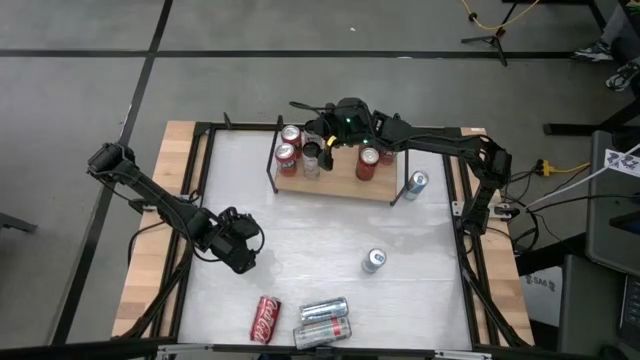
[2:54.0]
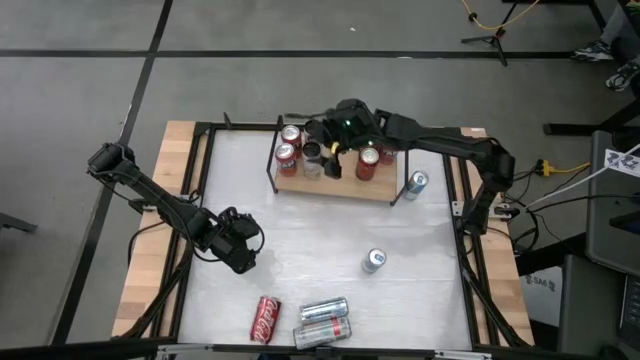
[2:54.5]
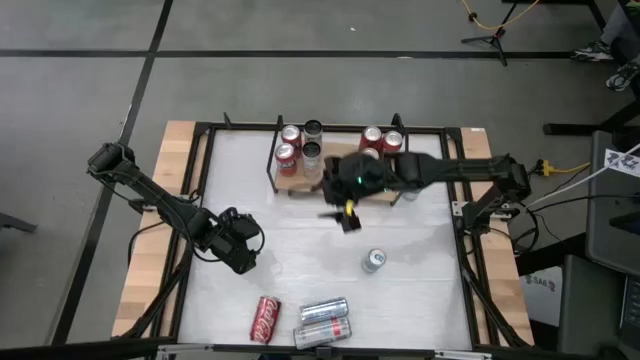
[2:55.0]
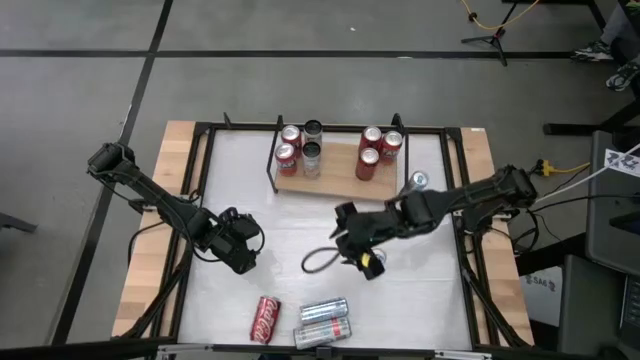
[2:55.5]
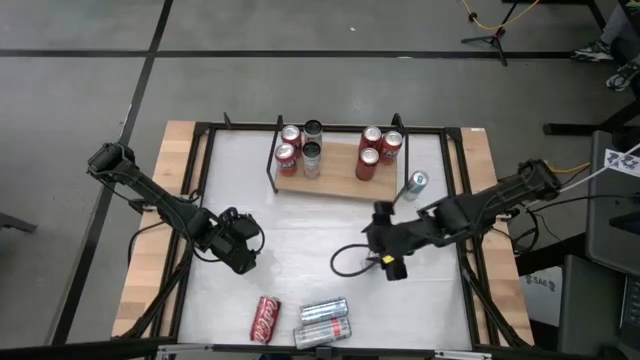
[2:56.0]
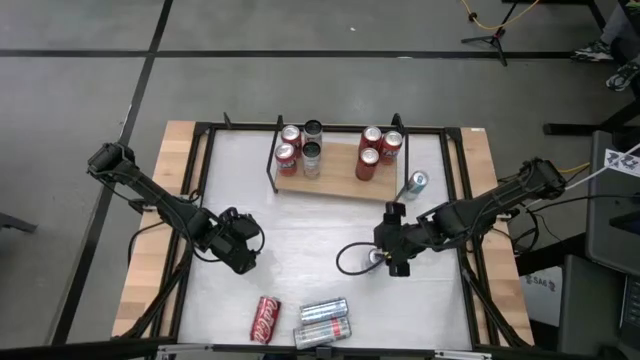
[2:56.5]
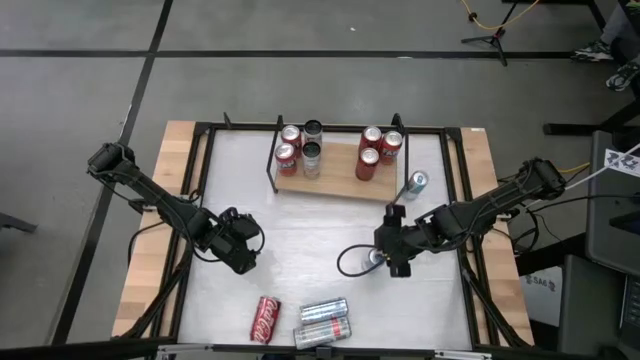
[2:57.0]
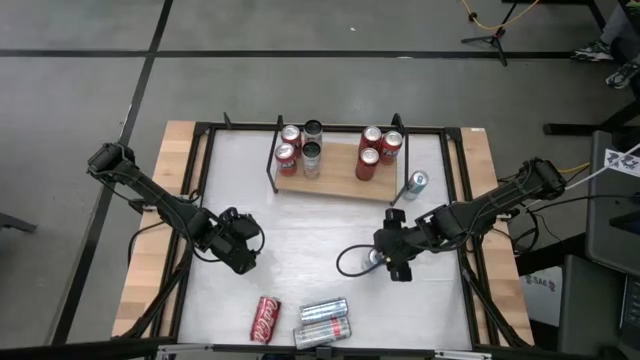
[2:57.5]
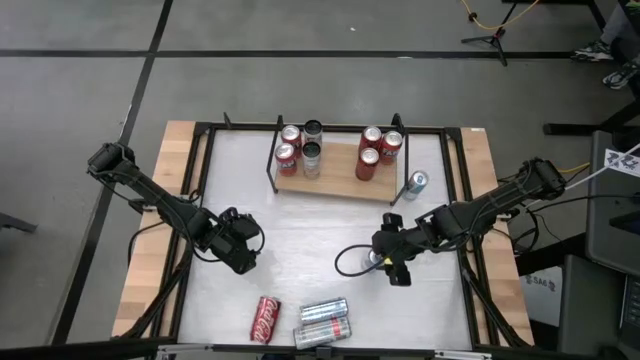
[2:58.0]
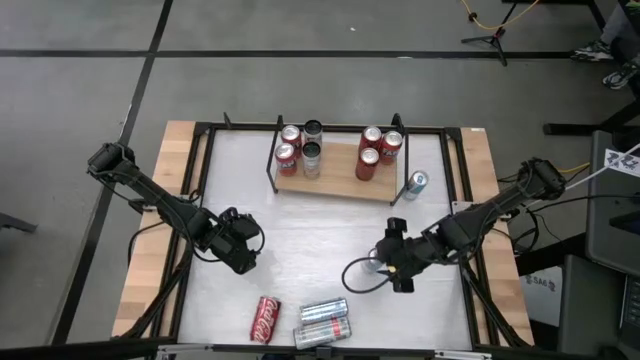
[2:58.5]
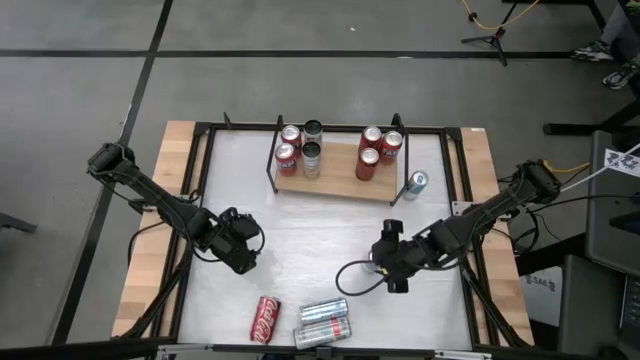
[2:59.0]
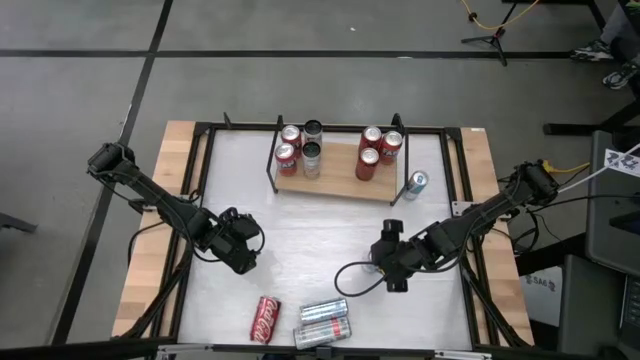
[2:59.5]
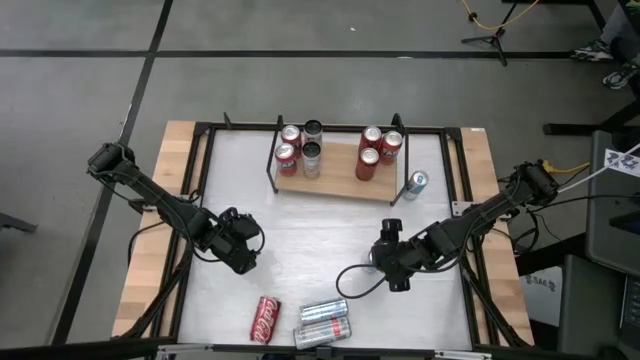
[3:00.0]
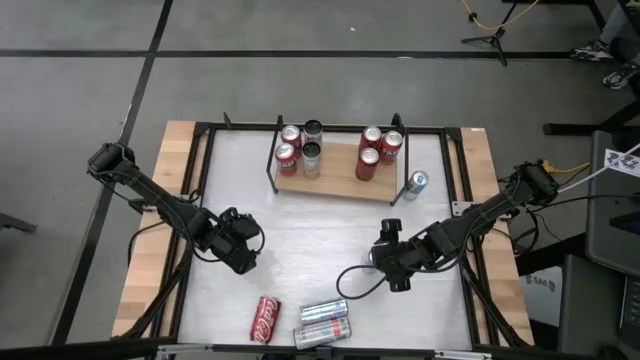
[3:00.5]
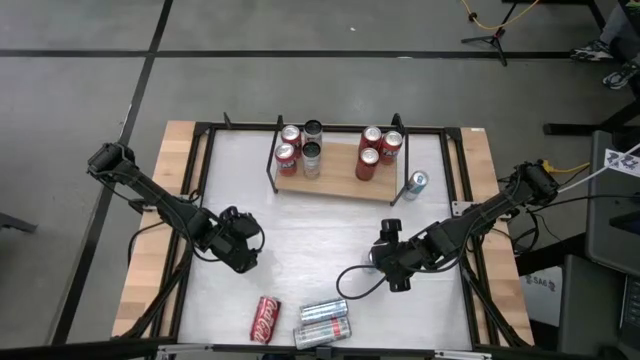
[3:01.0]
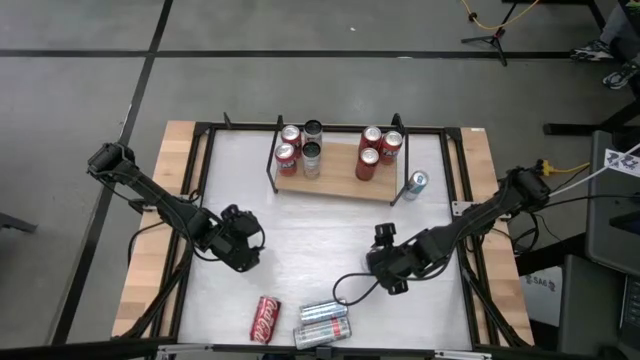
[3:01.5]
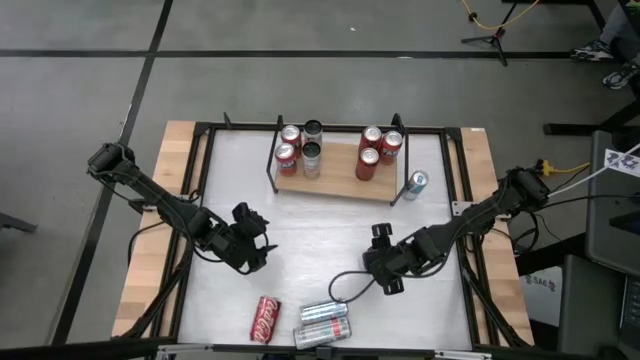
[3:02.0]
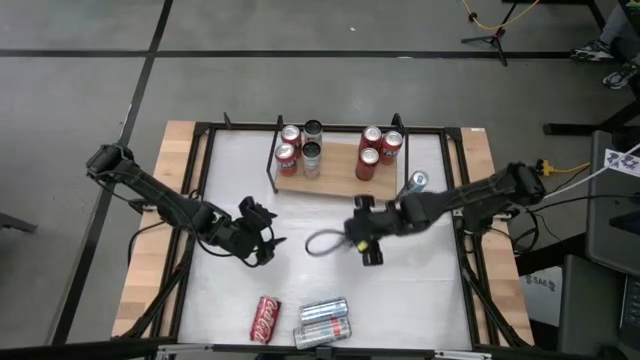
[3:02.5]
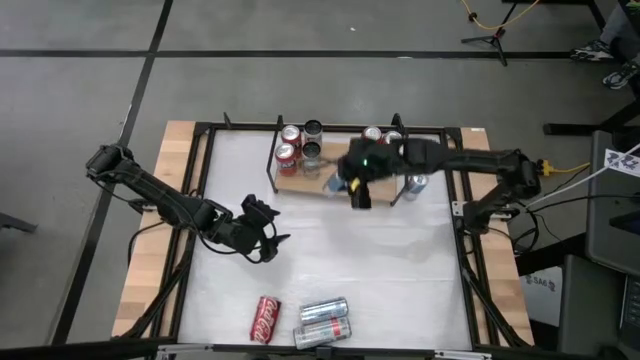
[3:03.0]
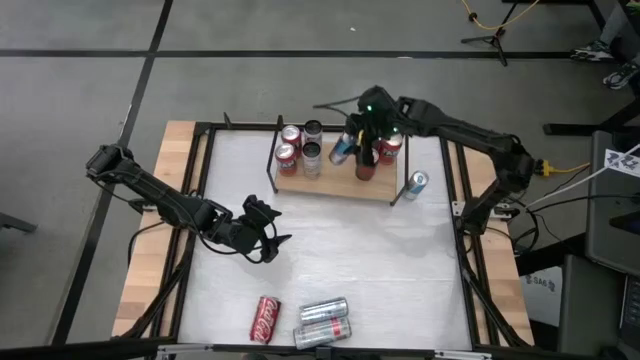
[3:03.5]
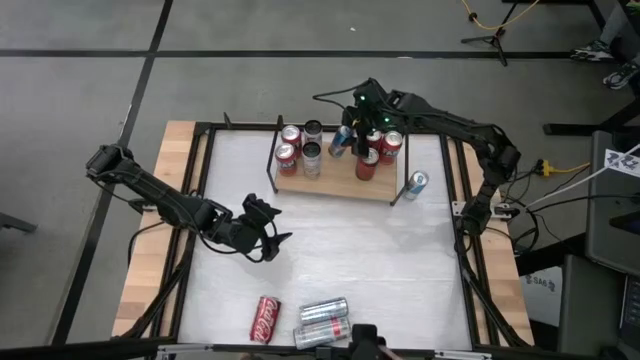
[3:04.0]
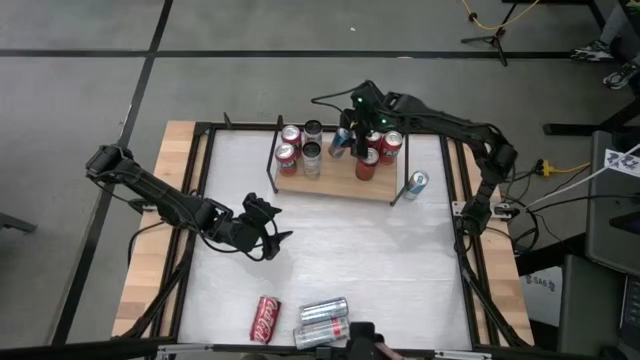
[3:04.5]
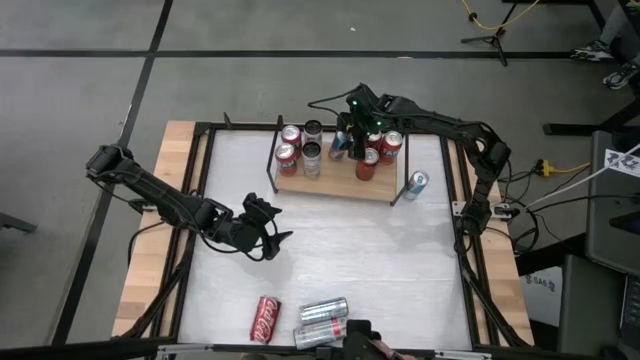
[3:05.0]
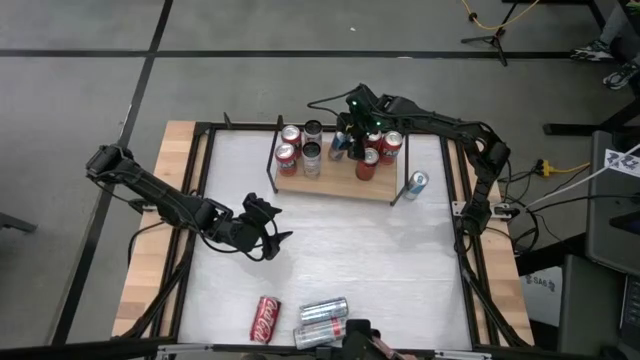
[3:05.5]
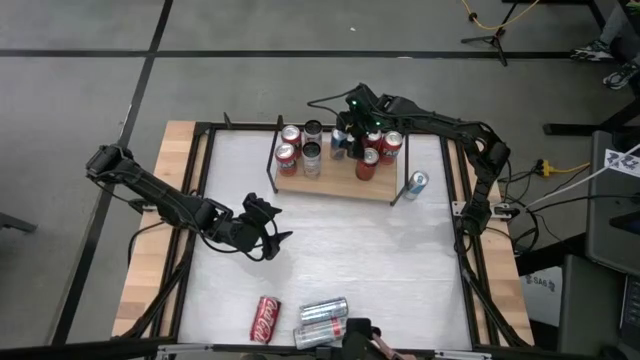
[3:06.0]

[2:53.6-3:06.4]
Task: Place canned beverage on shelf
Put the middle blue soda can on the shelf

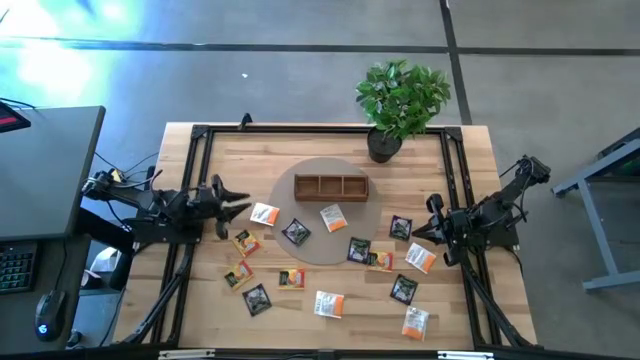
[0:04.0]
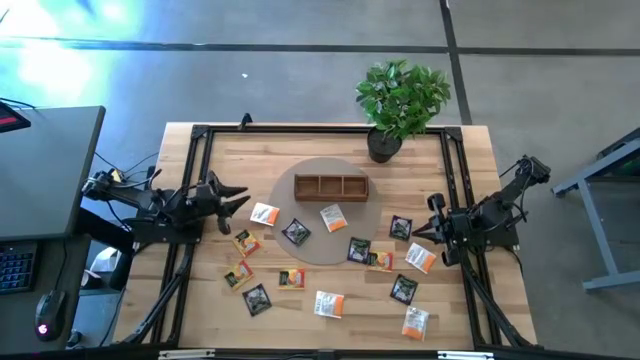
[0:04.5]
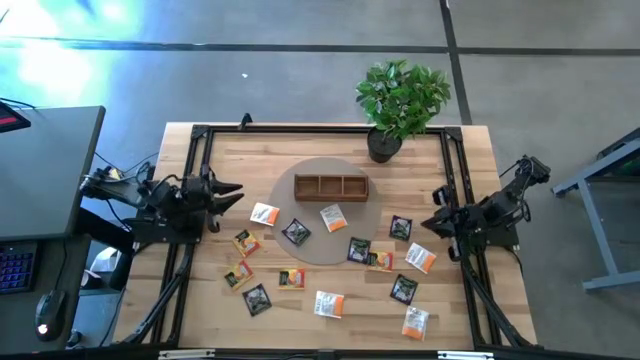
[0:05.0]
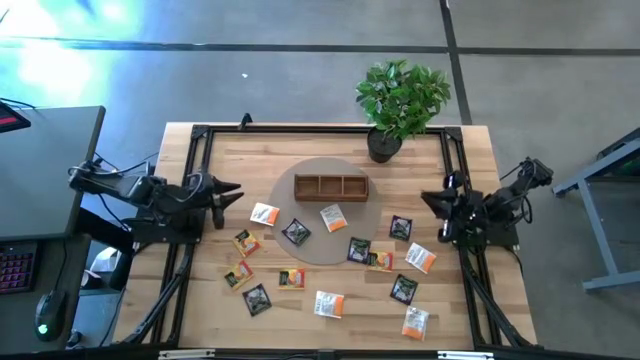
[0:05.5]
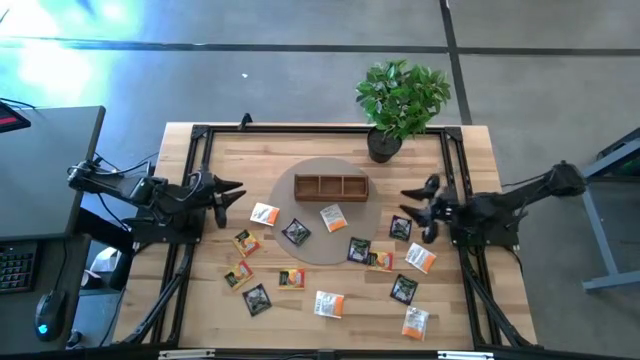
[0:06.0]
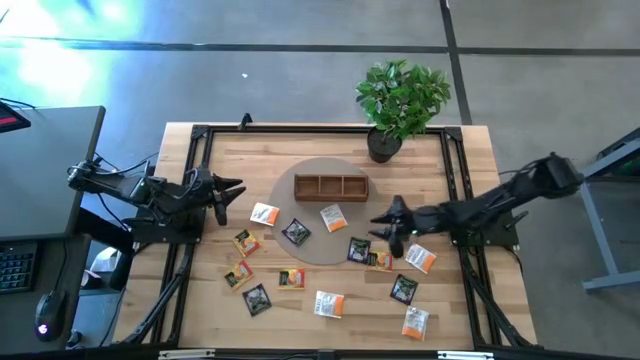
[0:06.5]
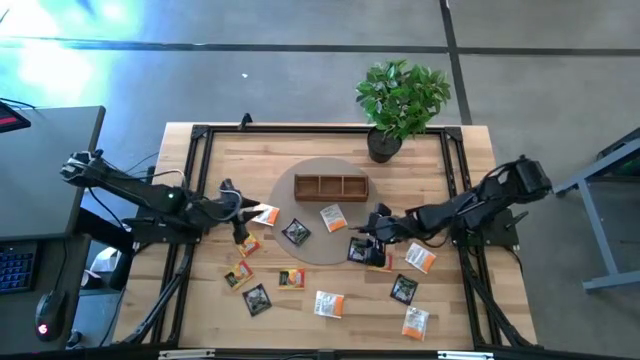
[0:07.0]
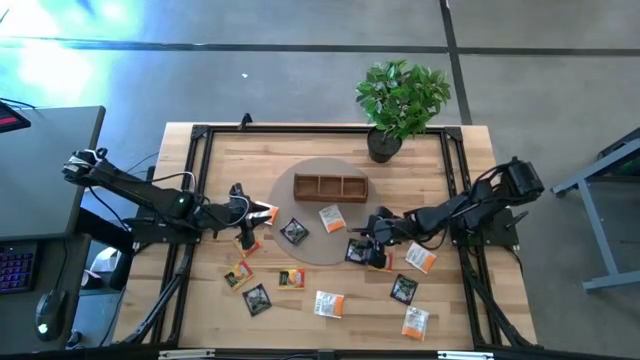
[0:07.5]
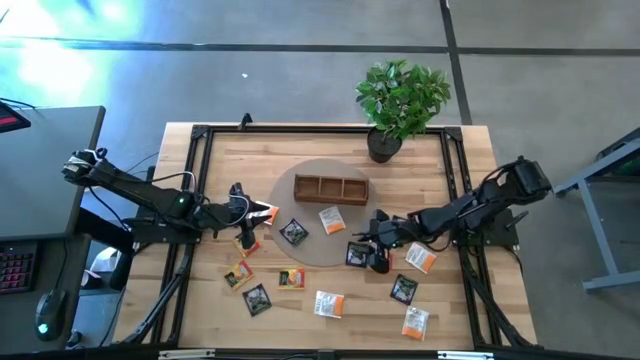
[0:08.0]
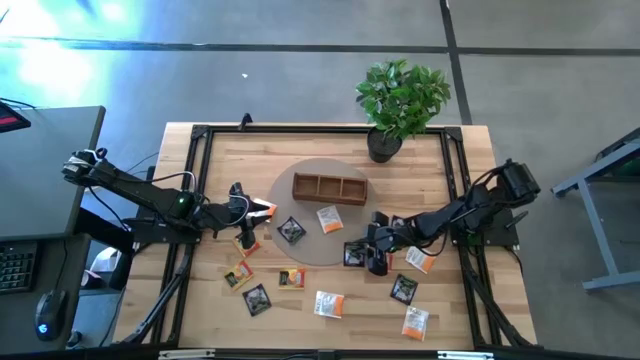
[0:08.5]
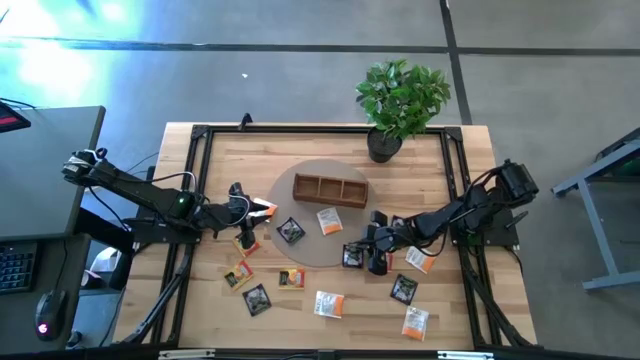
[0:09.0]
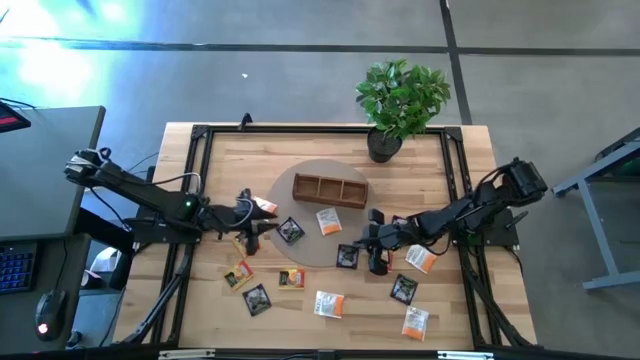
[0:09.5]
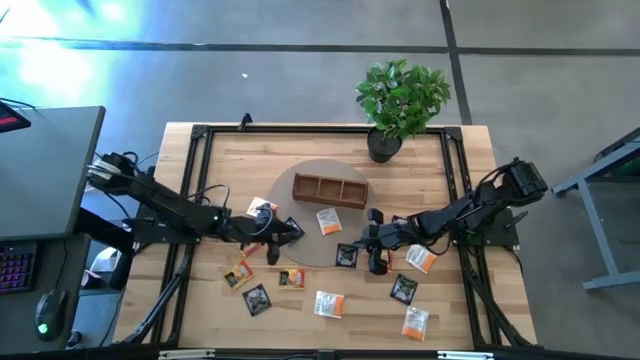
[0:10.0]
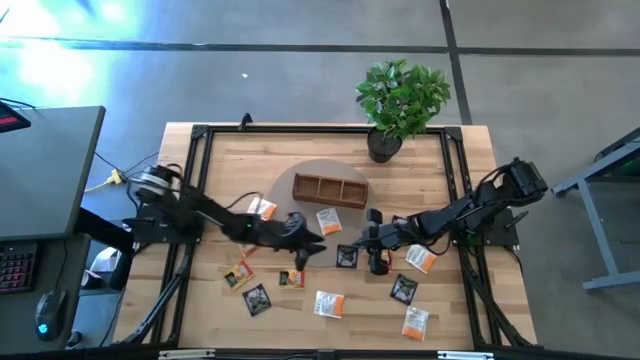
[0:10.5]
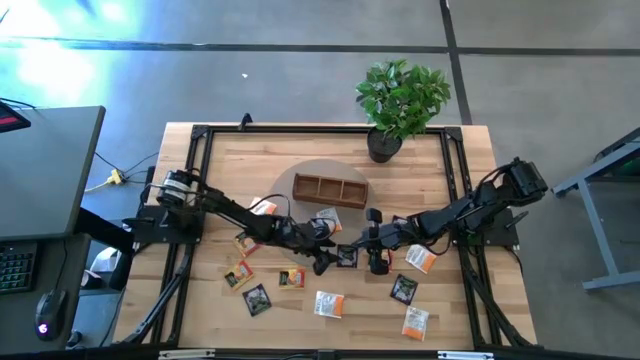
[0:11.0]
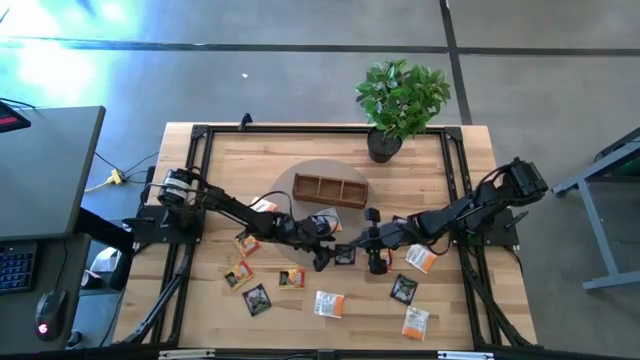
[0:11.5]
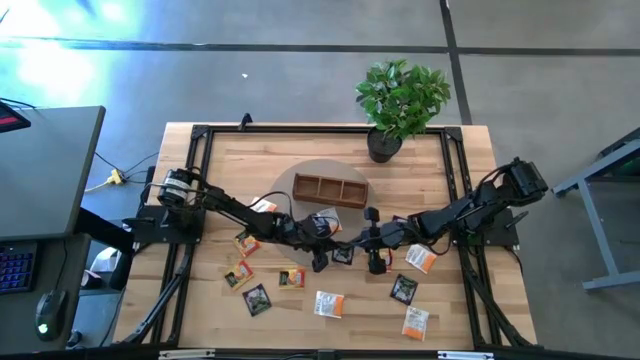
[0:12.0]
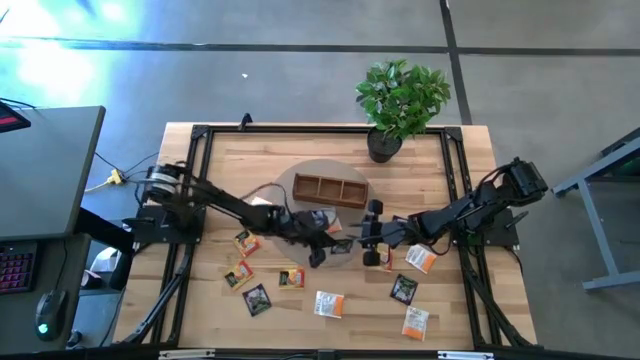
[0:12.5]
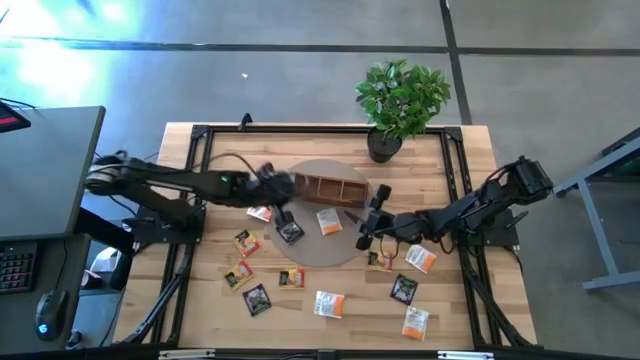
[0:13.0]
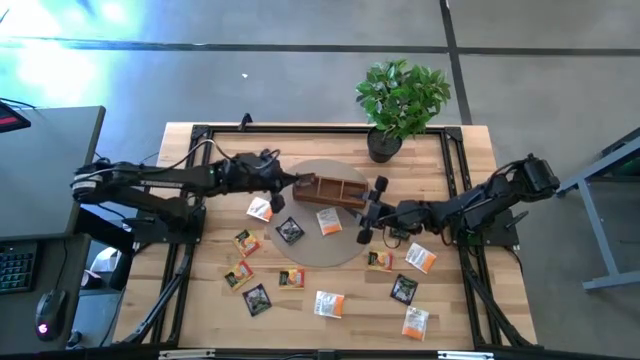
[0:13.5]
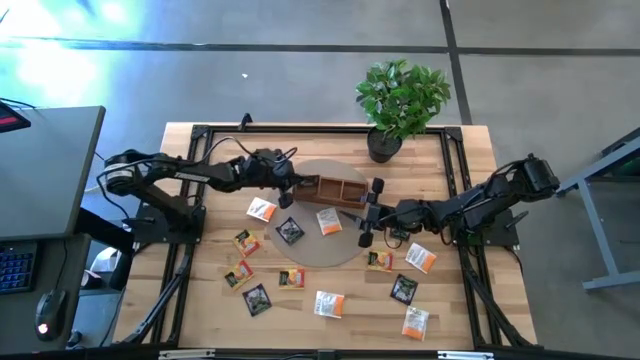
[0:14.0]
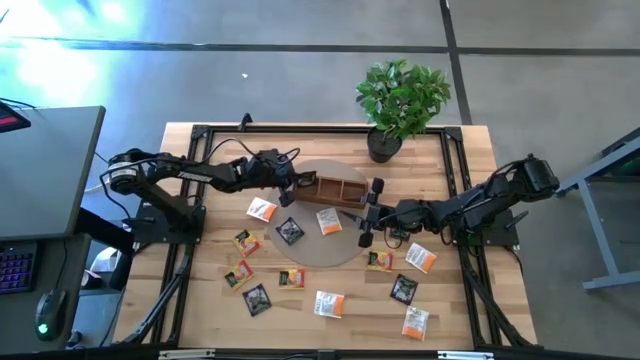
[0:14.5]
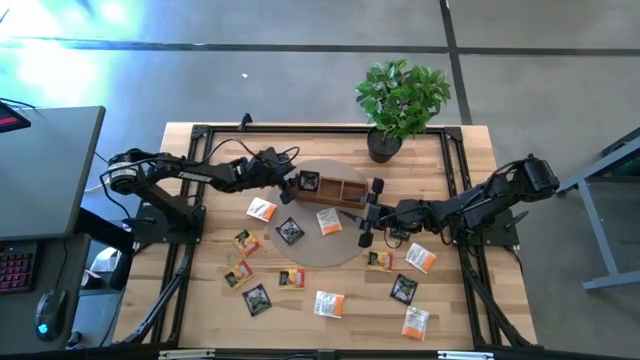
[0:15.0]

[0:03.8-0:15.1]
Task: Pick & Place Tea
Put the black tea bag into the left side area of the wooden organizer
